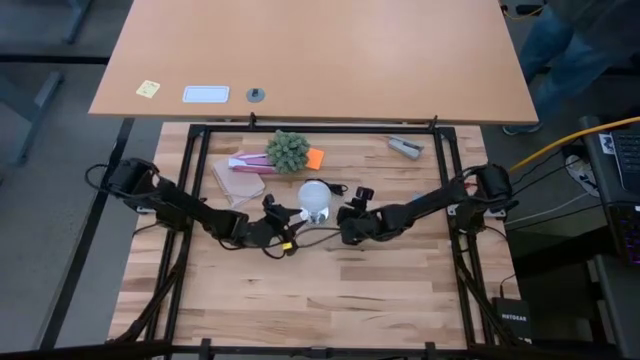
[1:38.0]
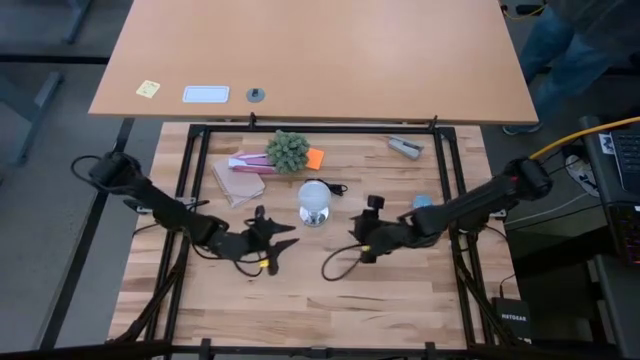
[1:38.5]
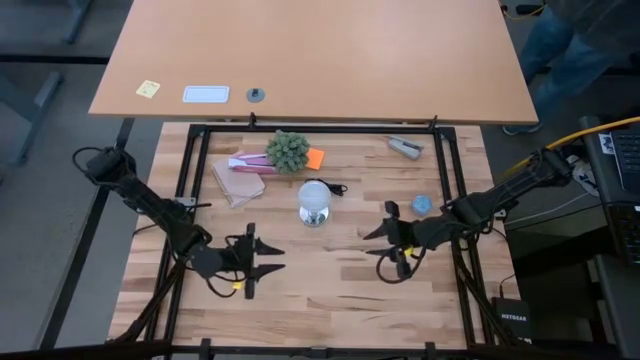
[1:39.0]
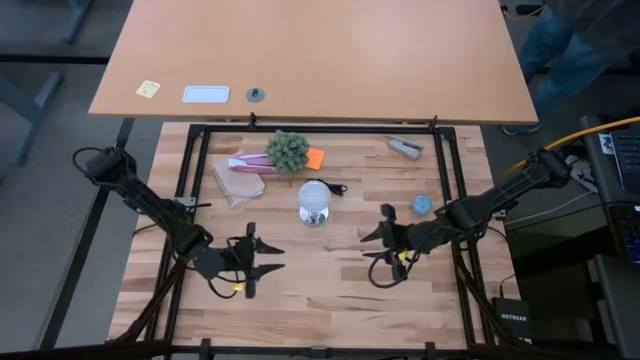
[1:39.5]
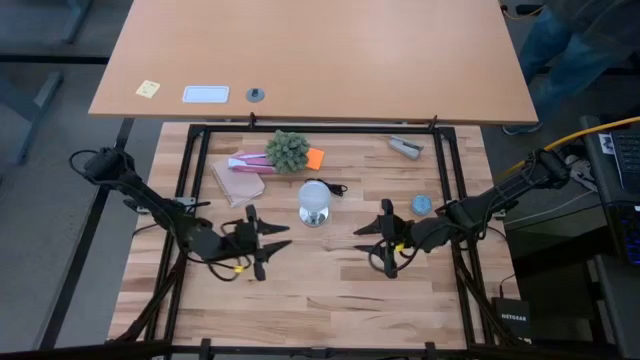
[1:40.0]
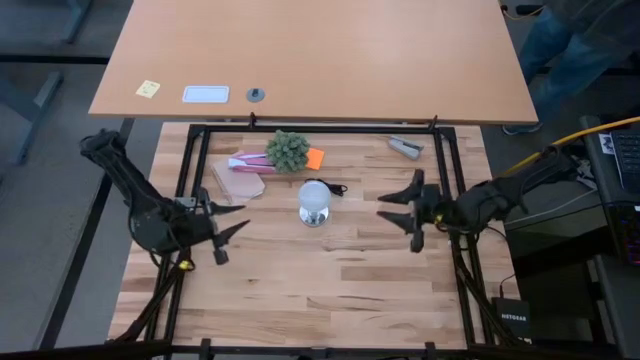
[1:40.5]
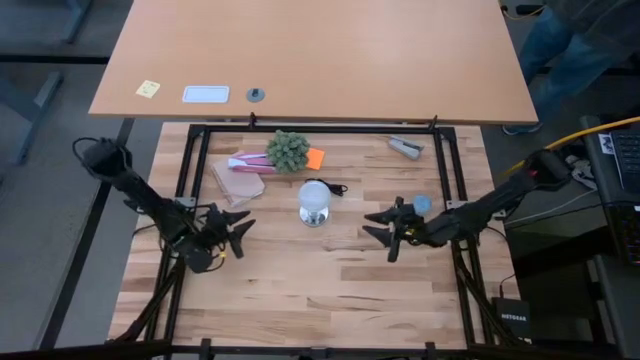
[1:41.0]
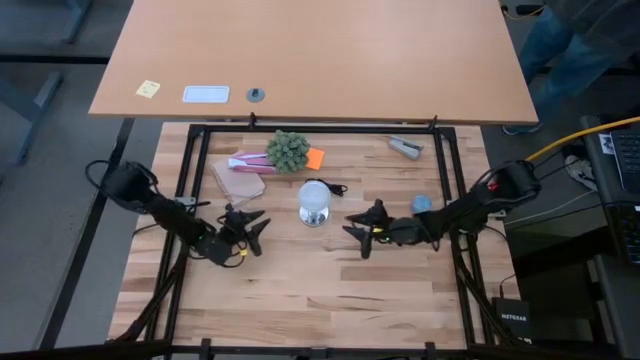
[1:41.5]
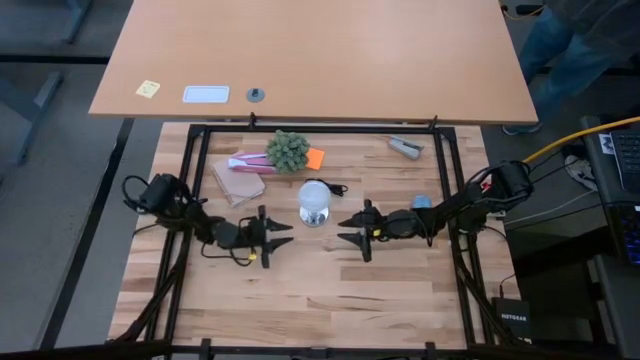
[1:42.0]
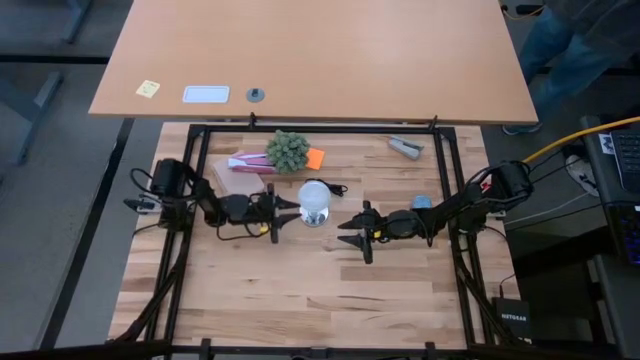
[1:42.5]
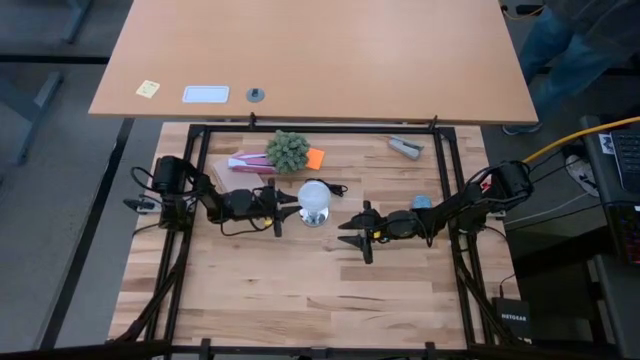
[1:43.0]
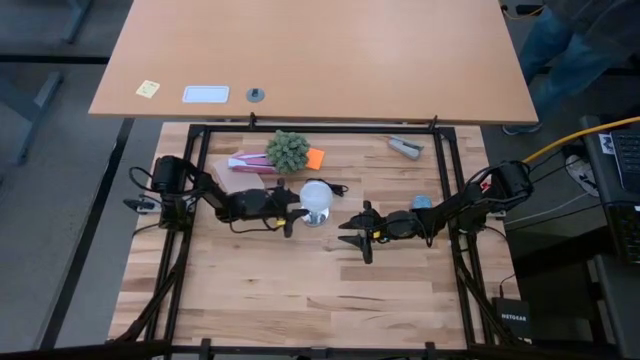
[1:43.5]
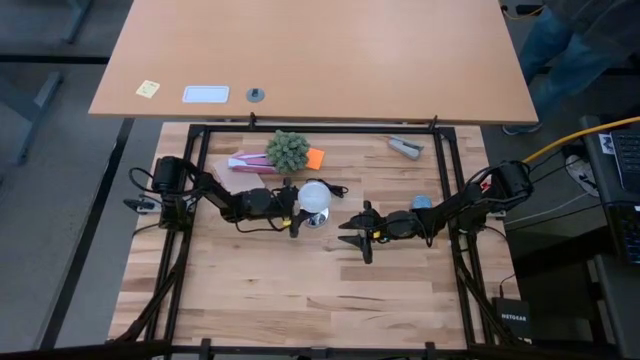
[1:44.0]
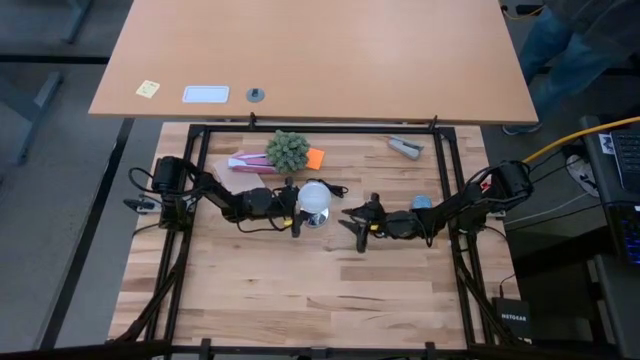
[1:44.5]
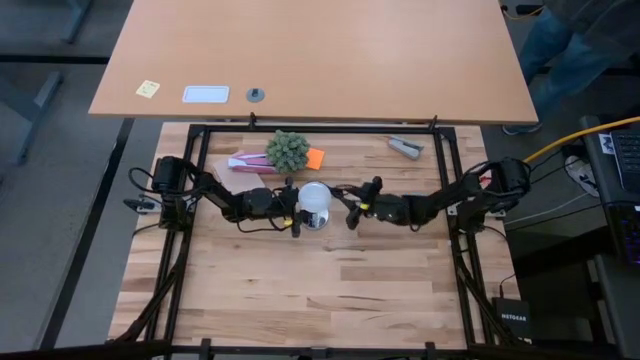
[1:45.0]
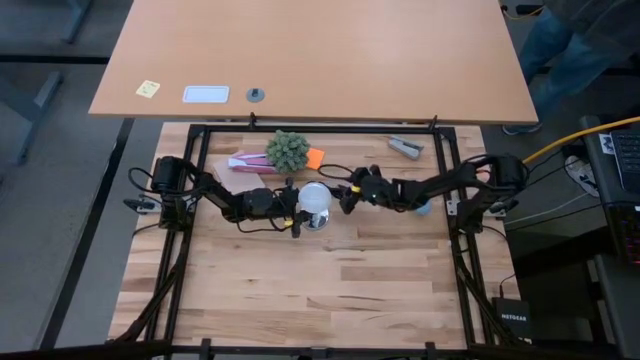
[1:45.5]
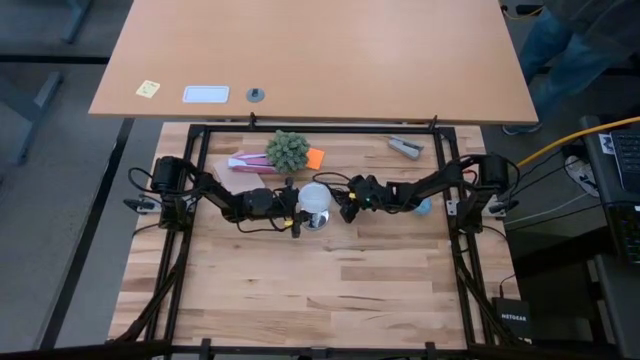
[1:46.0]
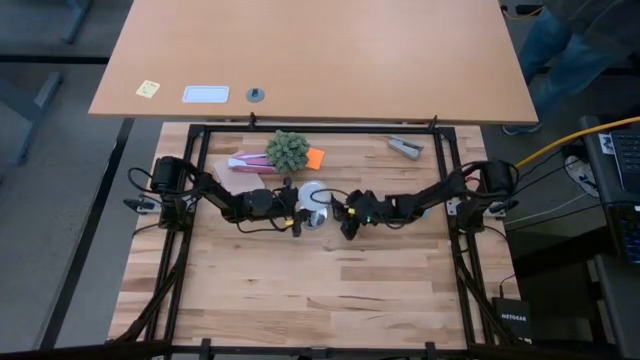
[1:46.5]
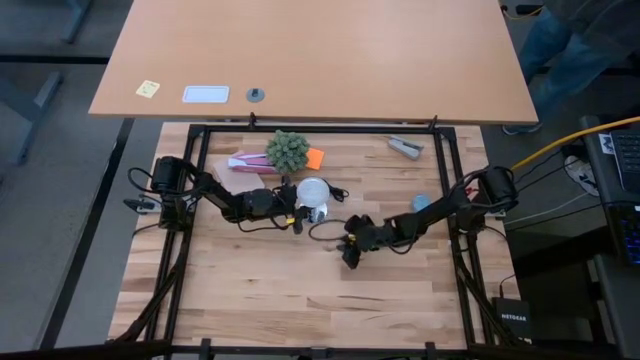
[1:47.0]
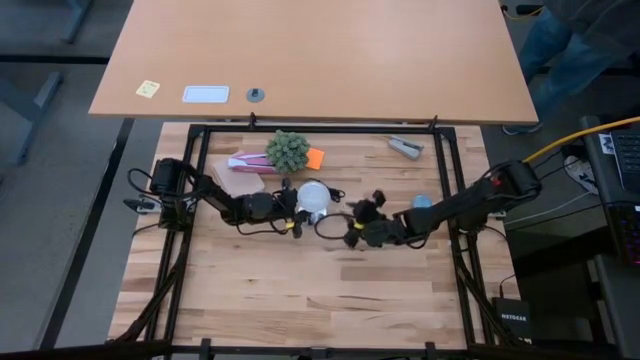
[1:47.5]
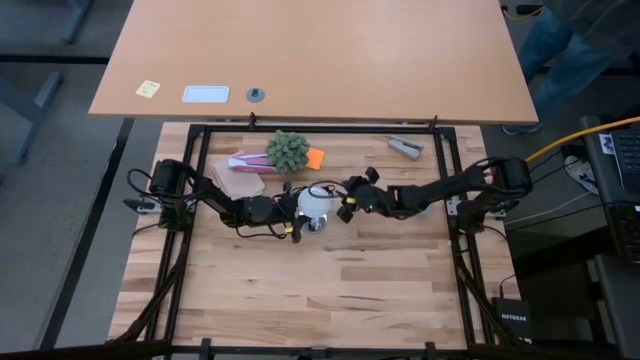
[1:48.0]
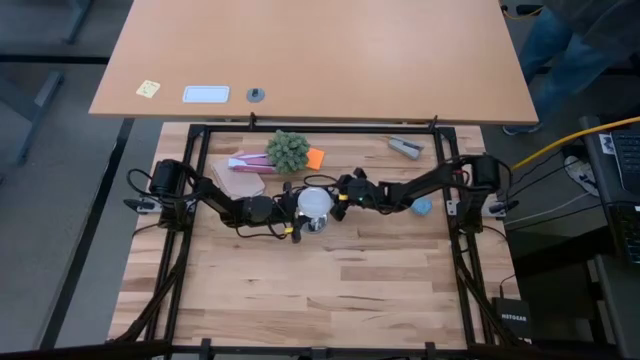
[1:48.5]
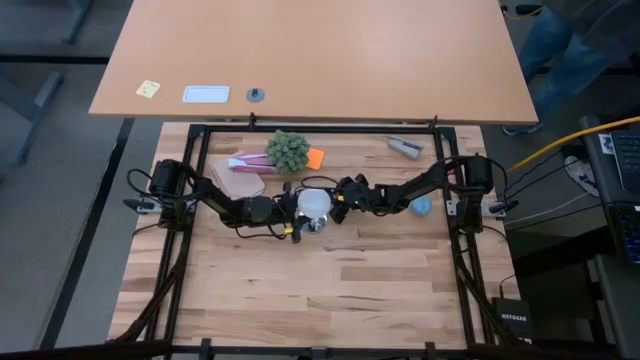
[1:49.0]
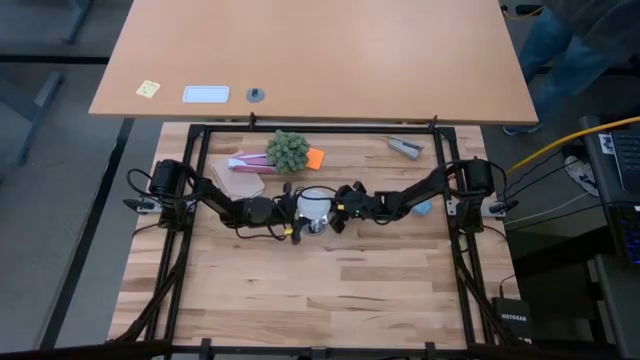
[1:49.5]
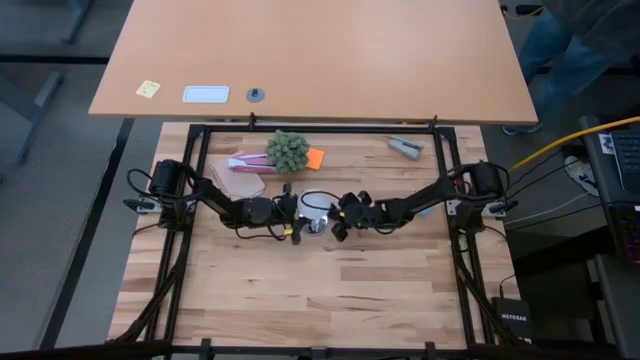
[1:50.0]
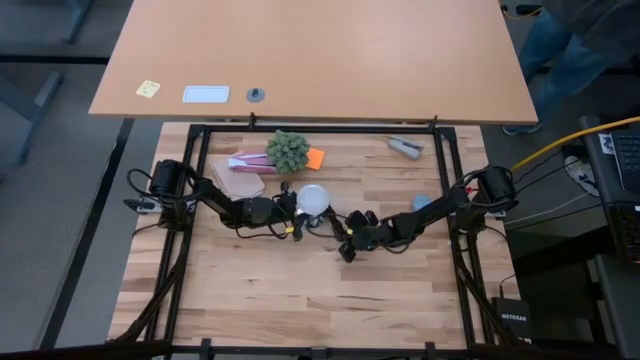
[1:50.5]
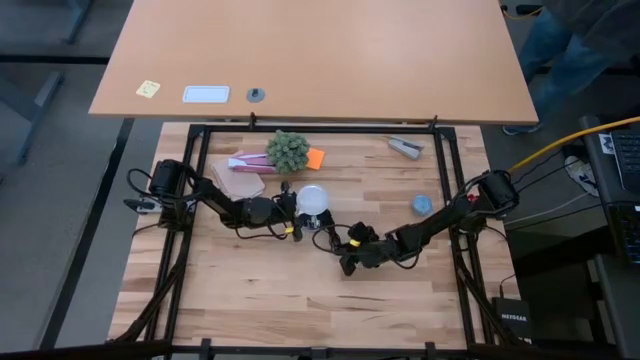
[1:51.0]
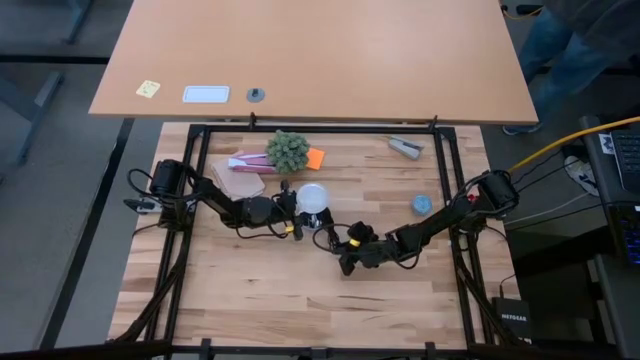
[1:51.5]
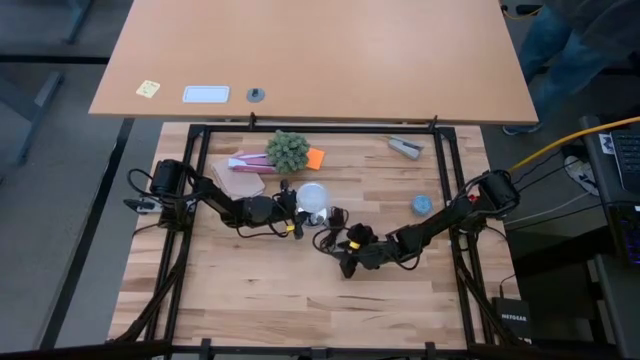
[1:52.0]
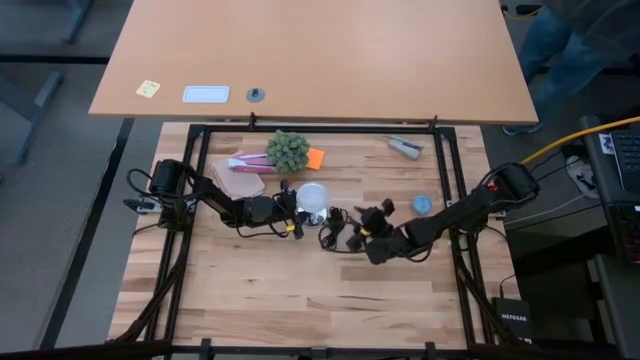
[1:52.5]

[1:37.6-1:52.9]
Task: Screw lightbulb
Remove the lightbulb from the lamp

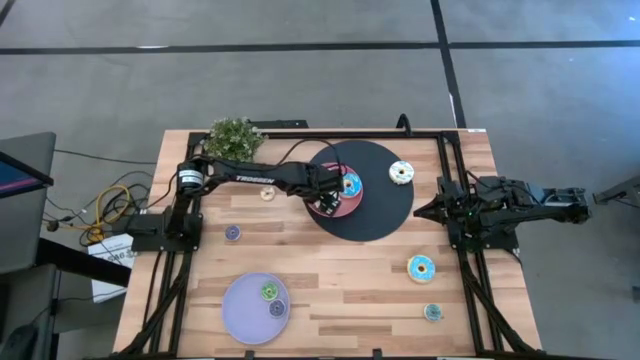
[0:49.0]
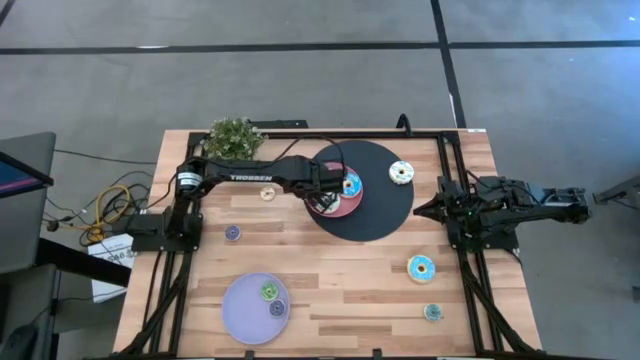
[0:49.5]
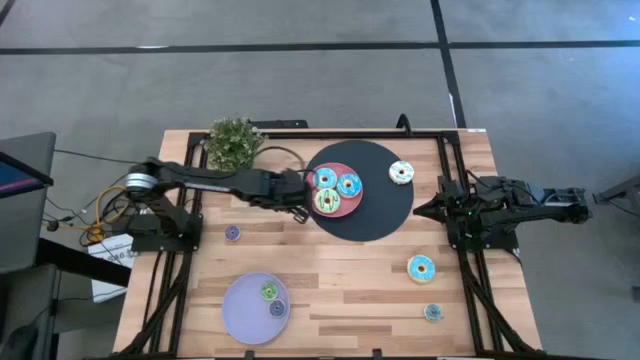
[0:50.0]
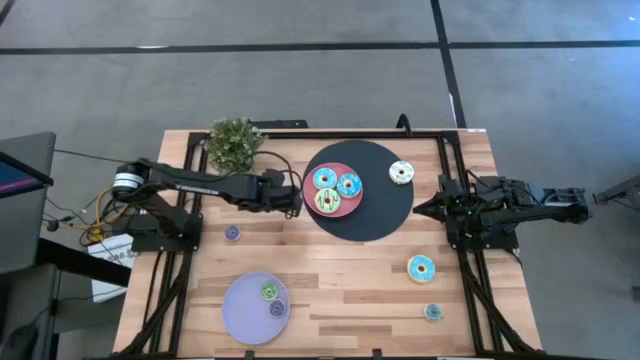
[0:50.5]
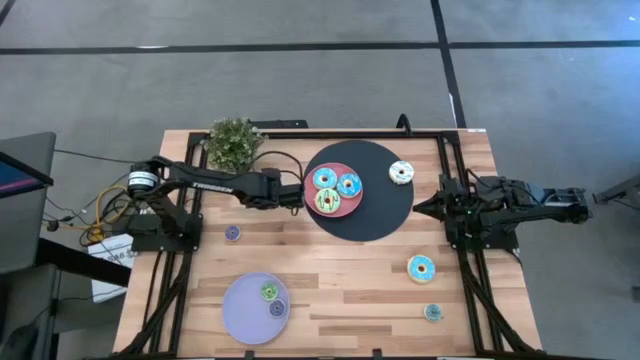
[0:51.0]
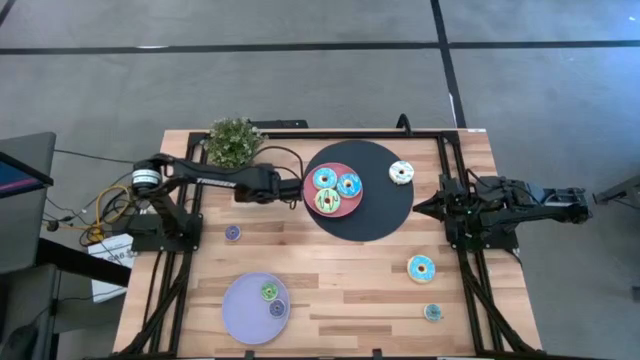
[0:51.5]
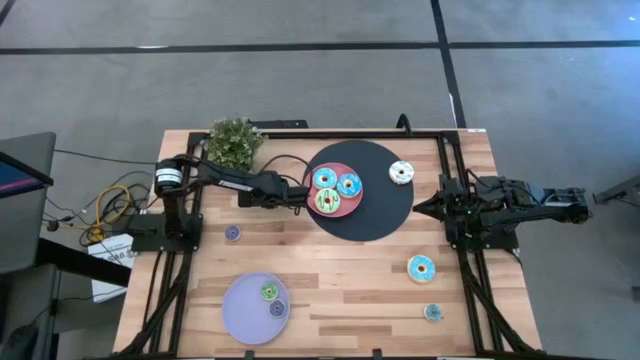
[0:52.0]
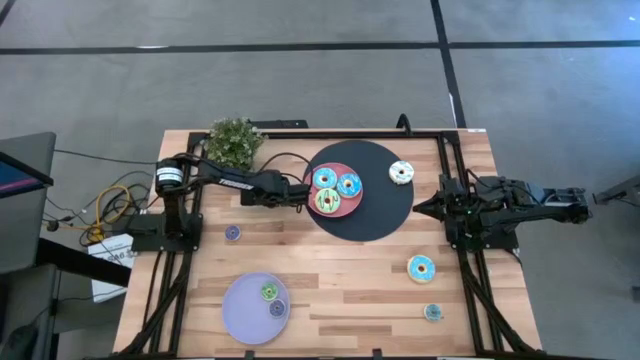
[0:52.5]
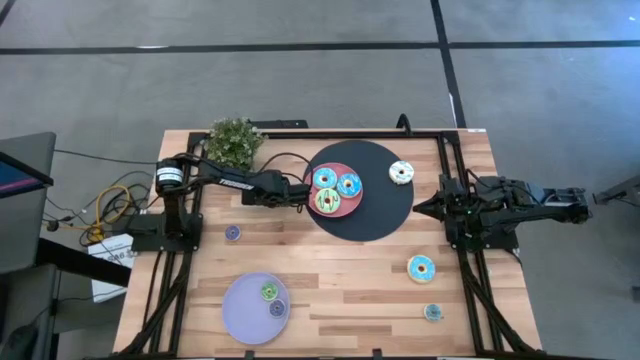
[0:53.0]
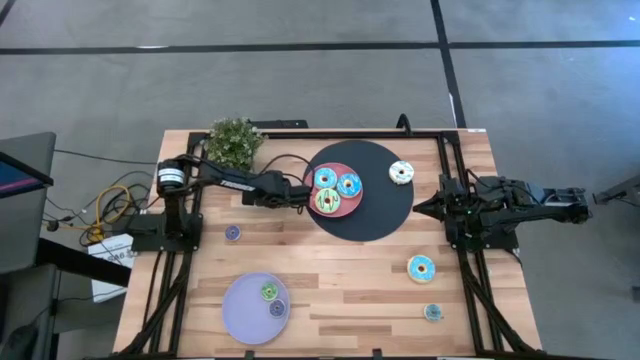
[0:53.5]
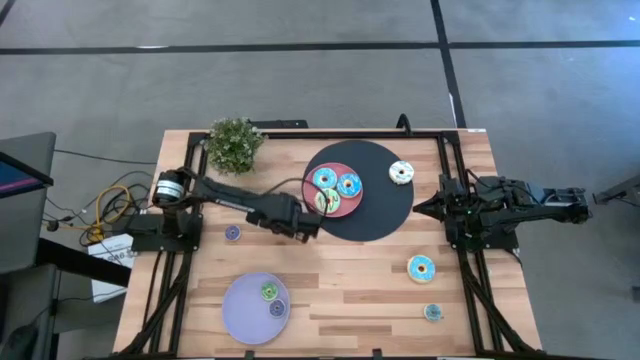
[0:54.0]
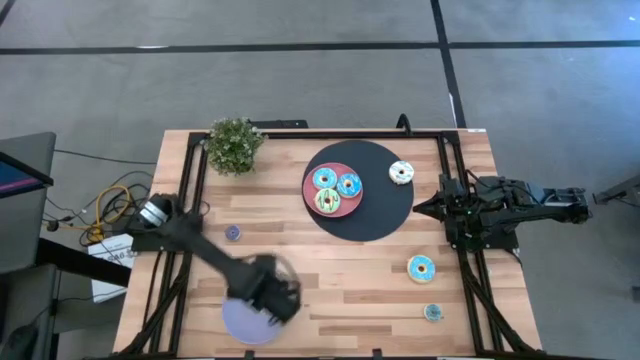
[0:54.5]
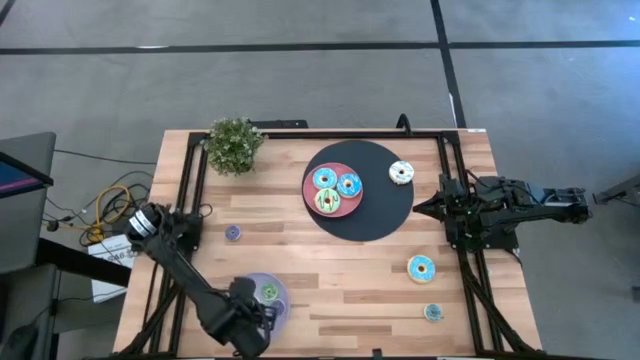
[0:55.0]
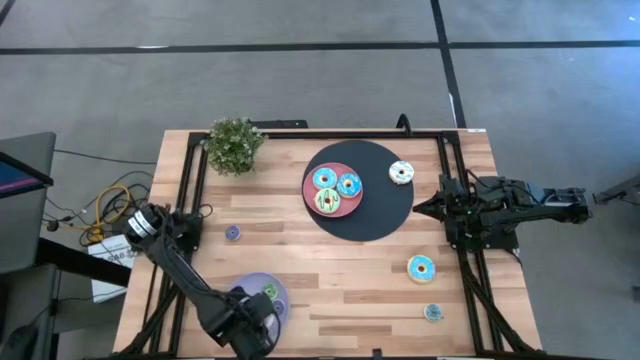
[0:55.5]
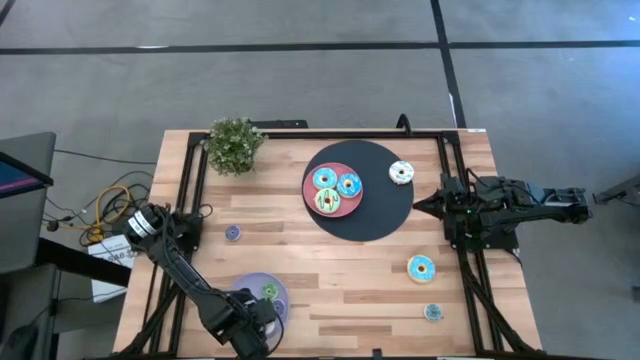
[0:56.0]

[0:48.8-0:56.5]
Task: Pick & Place donuts
Put the small white donut on the purple plate
